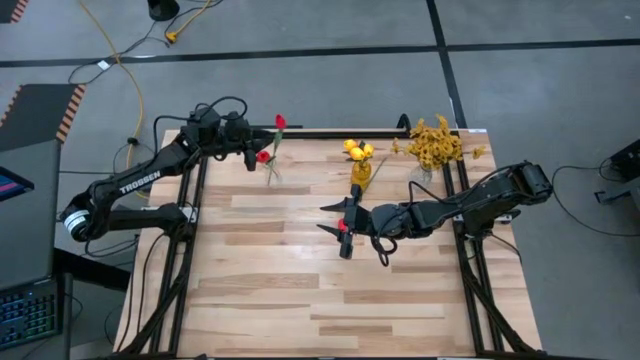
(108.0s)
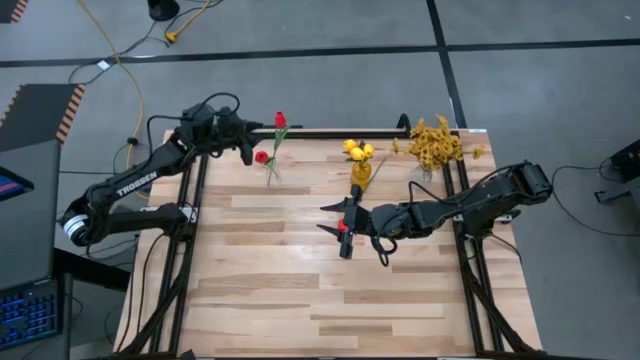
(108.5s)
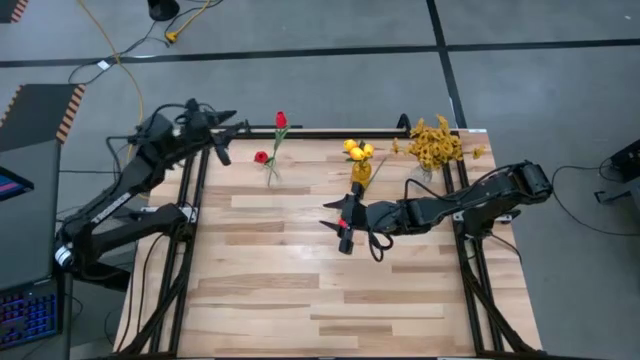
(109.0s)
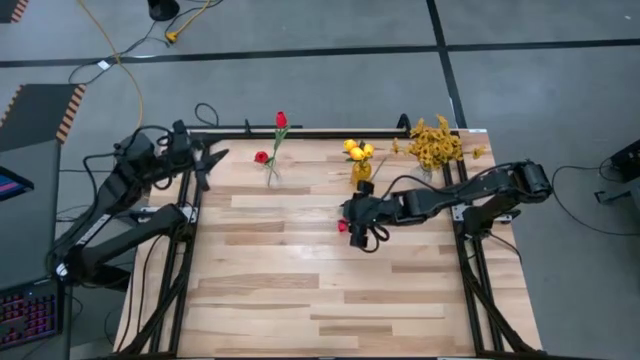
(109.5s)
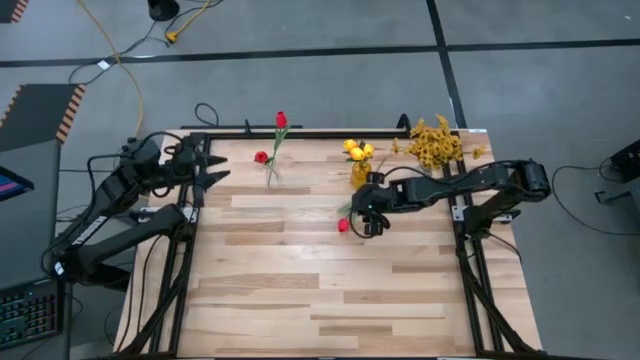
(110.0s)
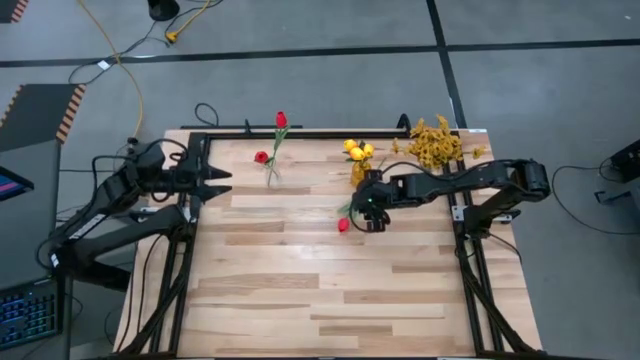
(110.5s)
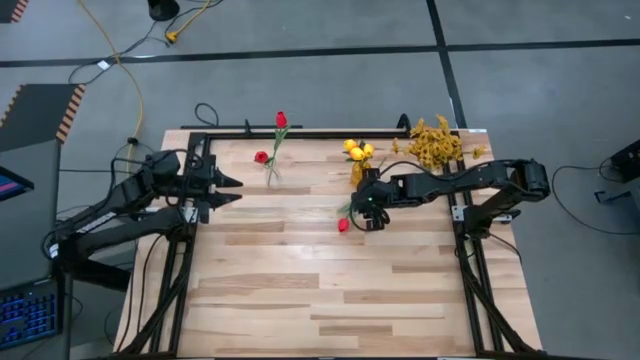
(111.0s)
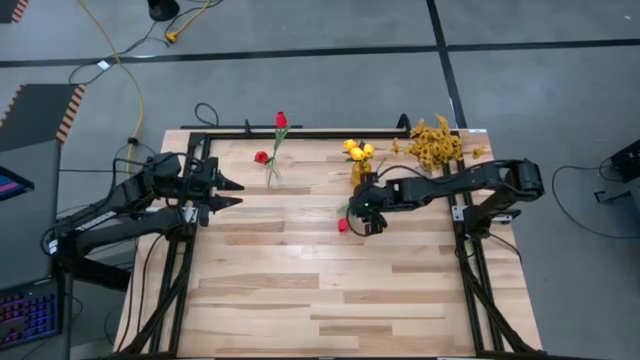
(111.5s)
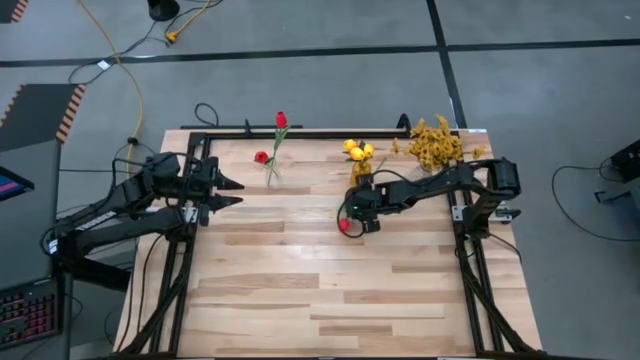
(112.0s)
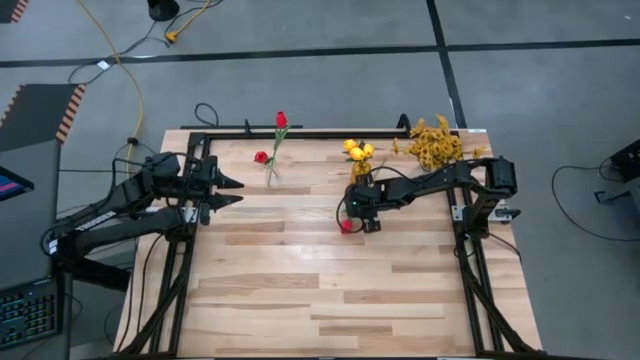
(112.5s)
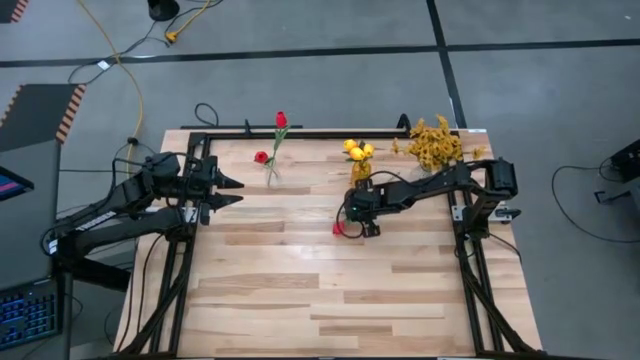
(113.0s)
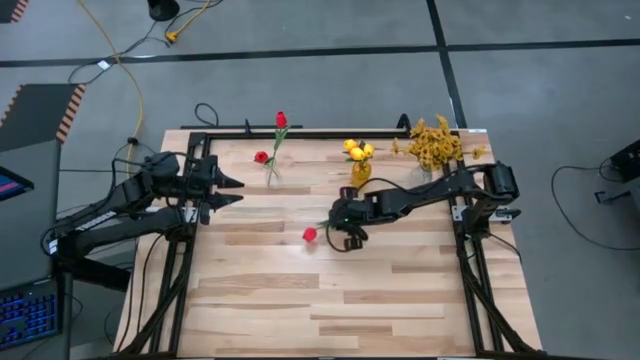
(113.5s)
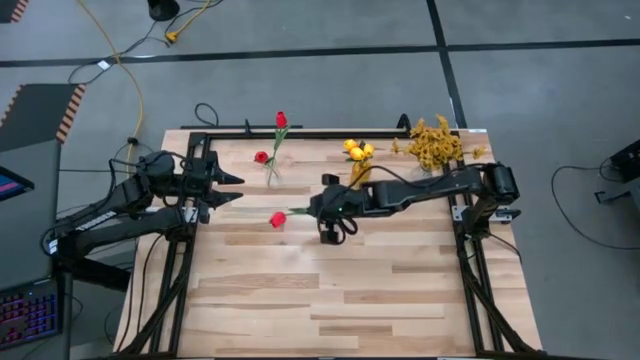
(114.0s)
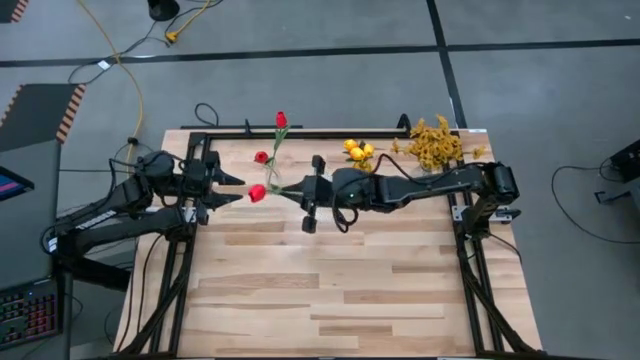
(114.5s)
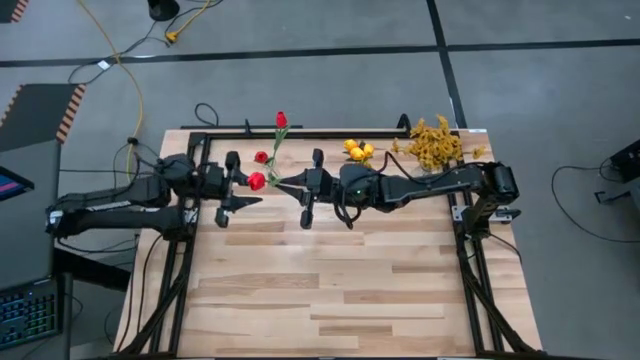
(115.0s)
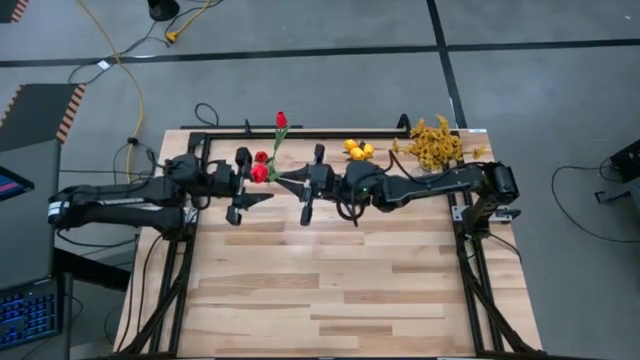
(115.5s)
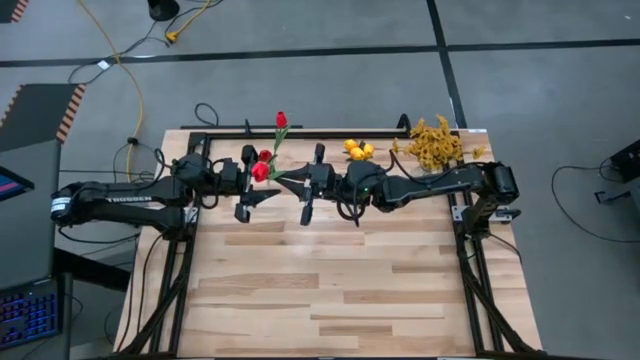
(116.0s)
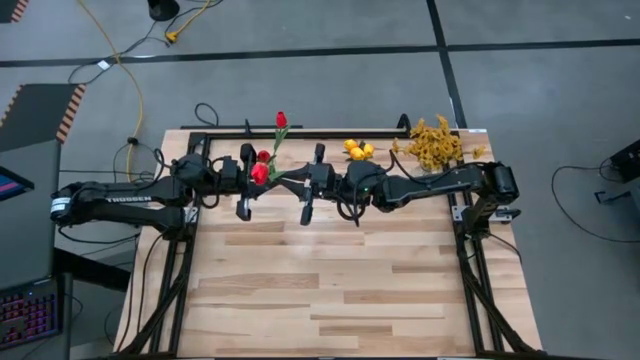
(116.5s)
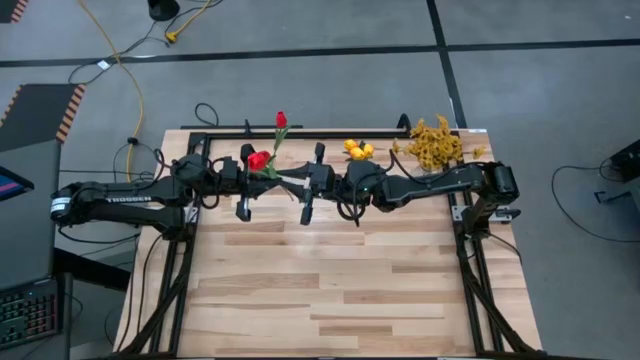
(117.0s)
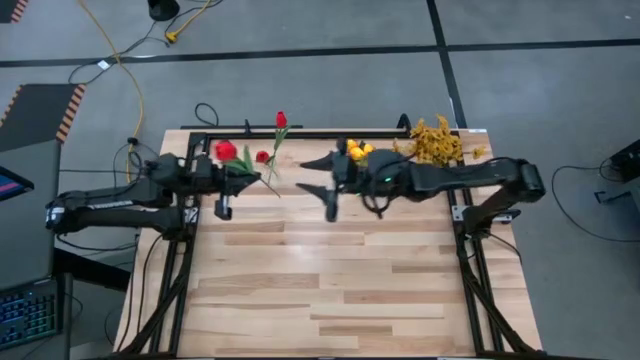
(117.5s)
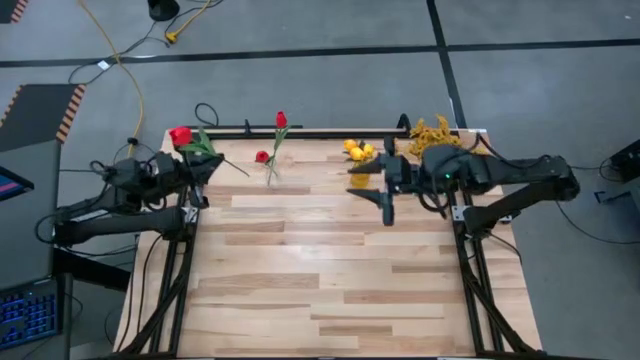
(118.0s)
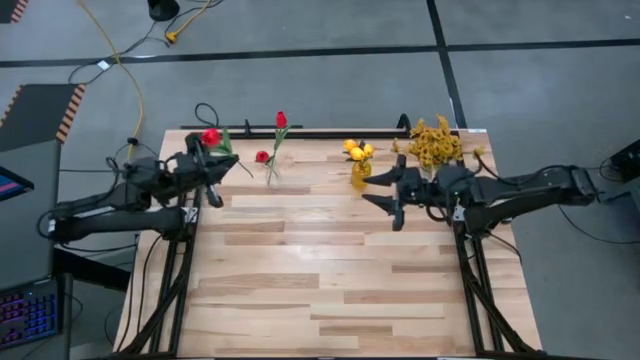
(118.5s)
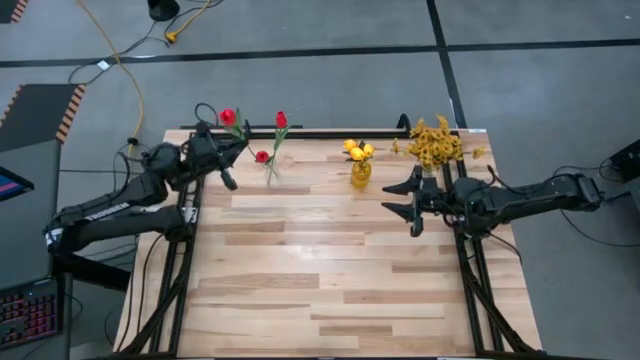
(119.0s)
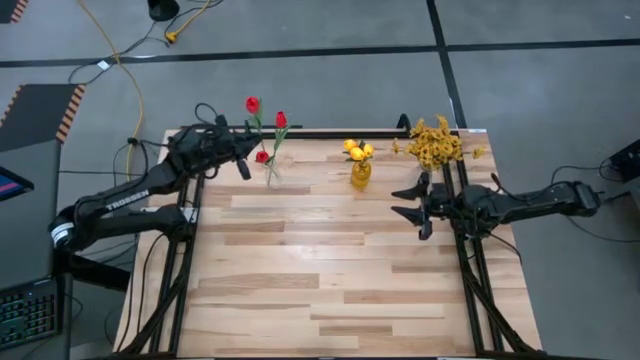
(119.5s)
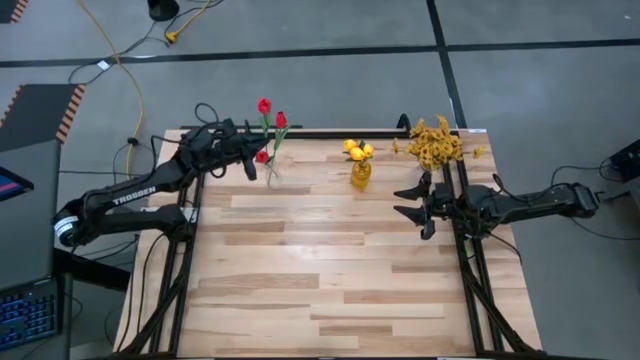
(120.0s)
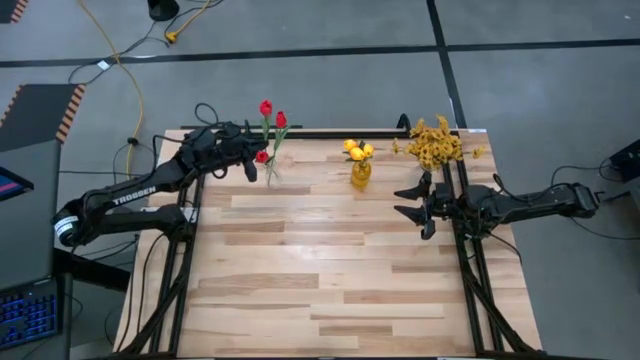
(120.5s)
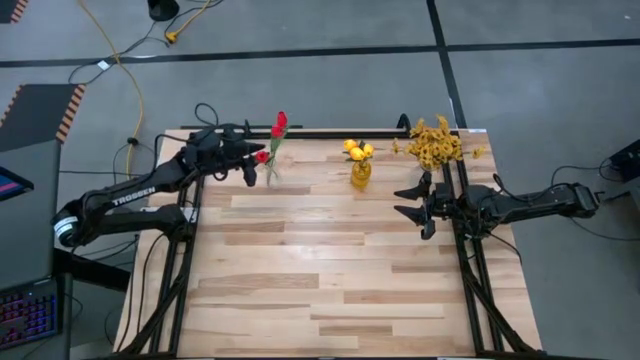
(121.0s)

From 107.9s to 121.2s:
Task: Sort flowers into vase by color
Put the red flower into the left transparent flower vase

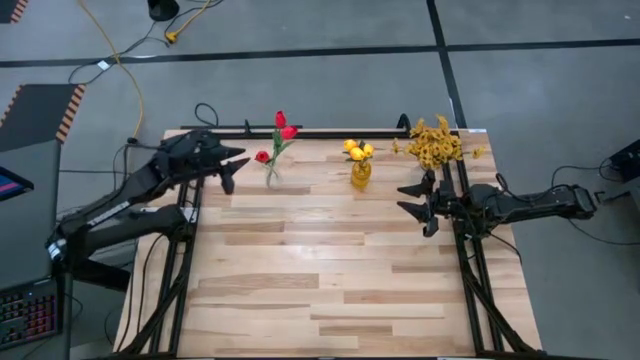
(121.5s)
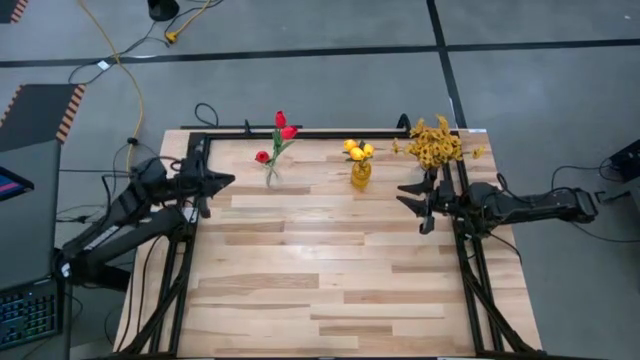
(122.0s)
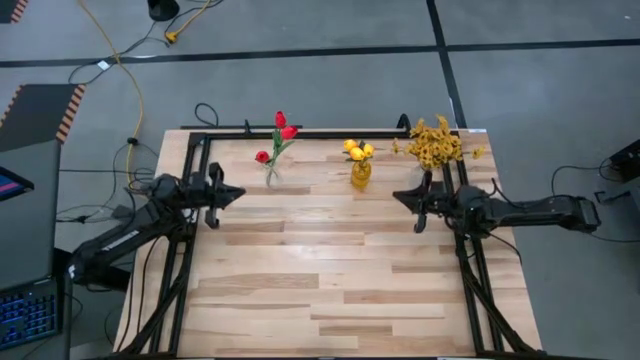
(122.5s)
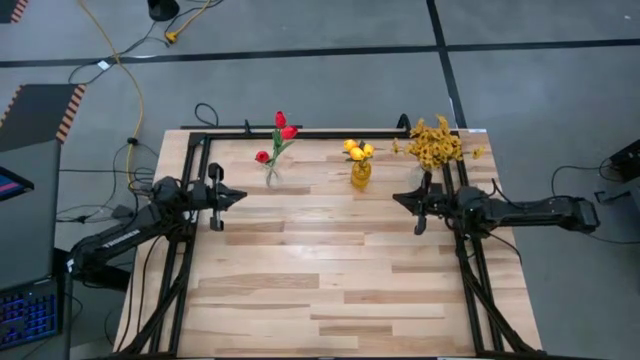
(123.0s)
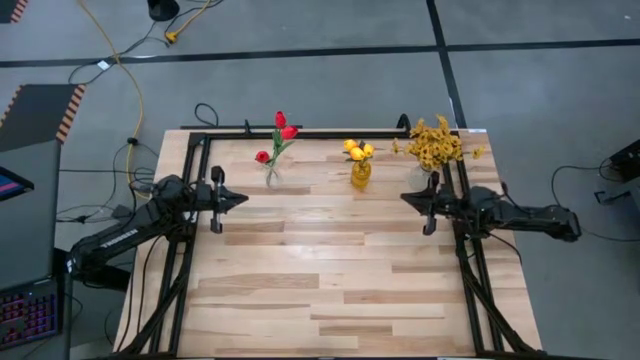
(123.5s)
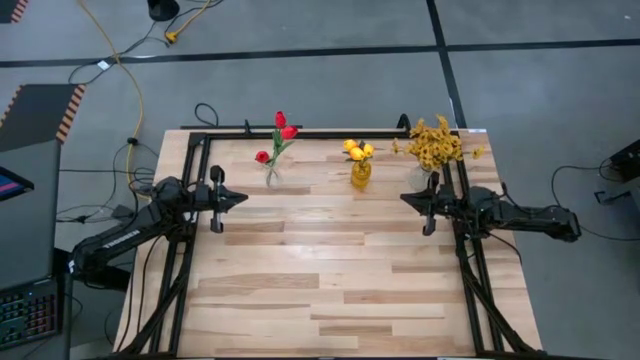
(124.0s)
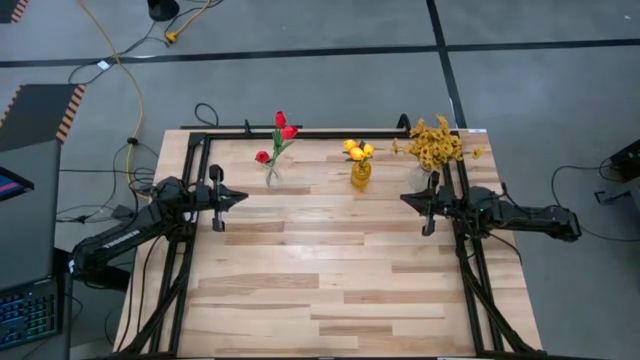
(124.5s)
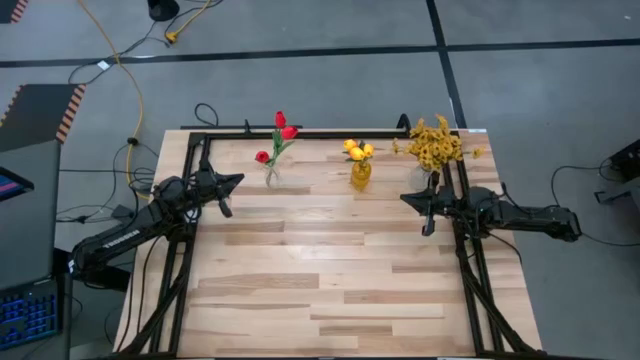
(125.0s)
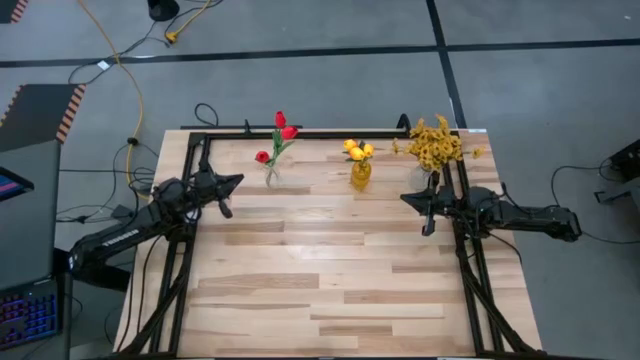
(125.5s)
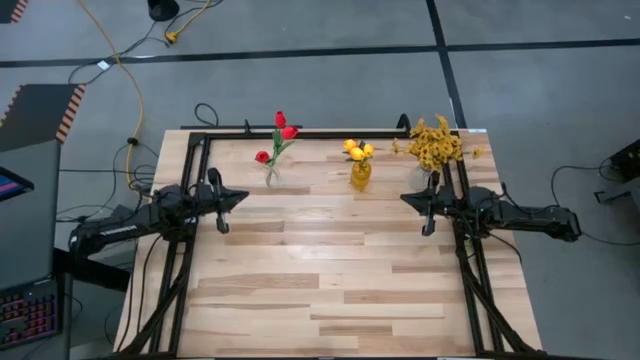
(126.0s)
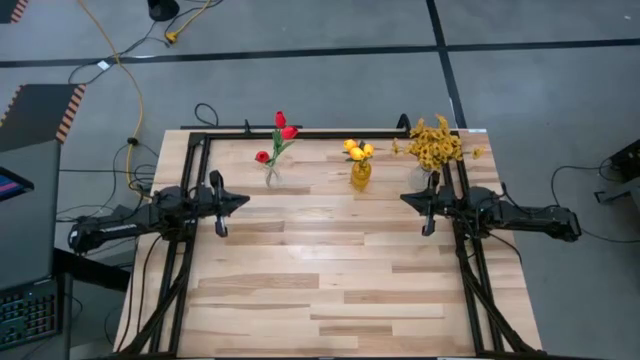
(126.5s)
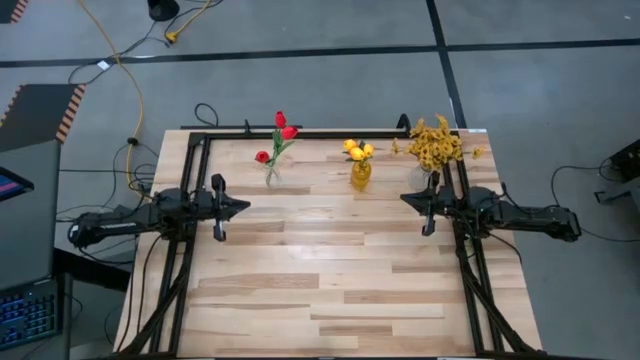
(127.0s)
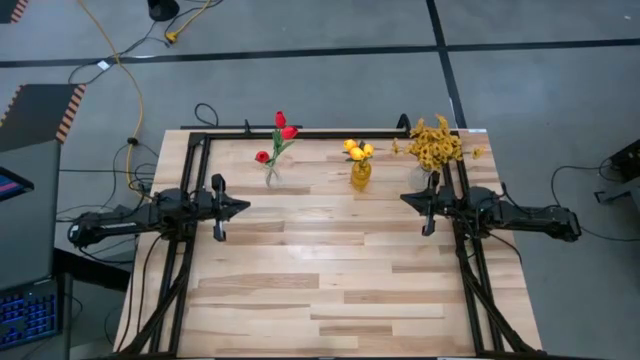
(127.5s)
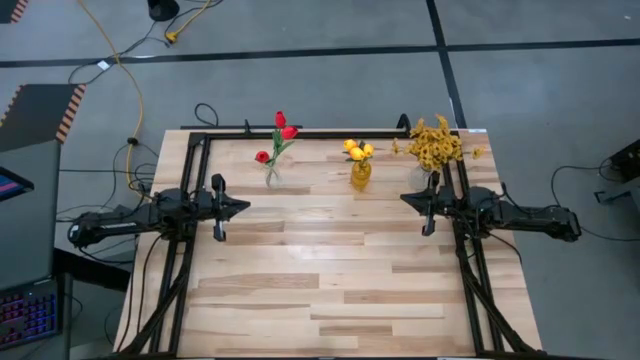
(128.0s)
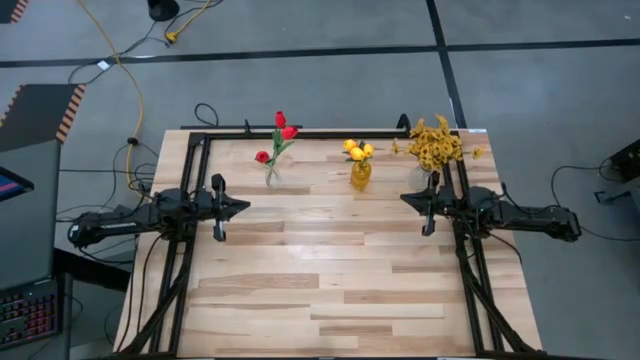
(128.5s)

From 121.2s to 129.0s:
Return to Home Position

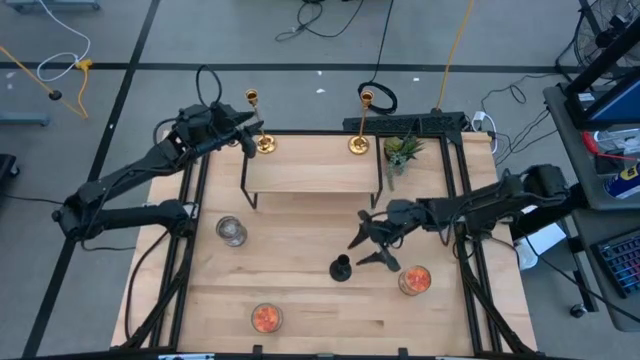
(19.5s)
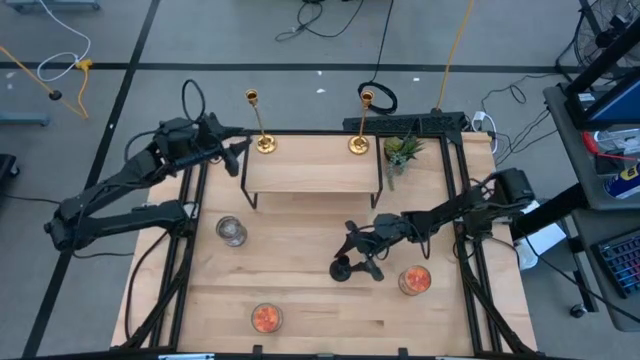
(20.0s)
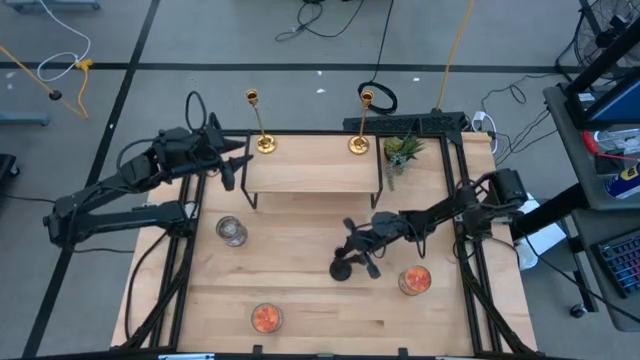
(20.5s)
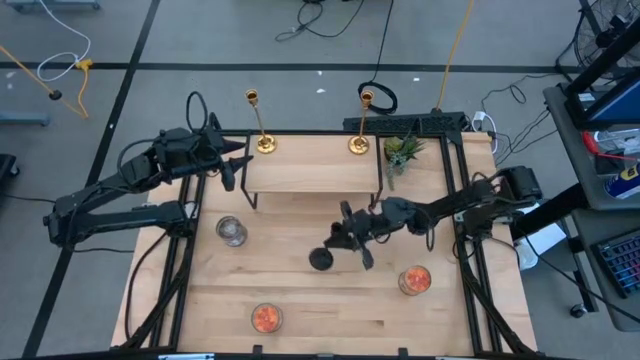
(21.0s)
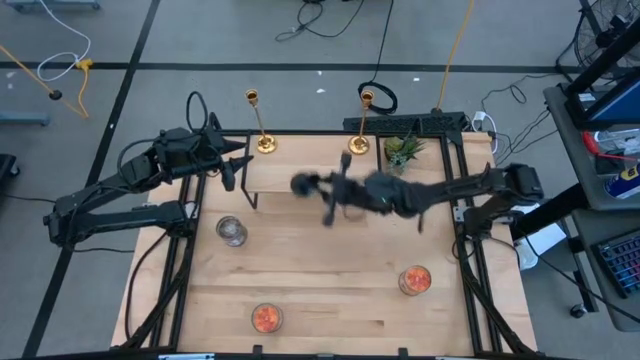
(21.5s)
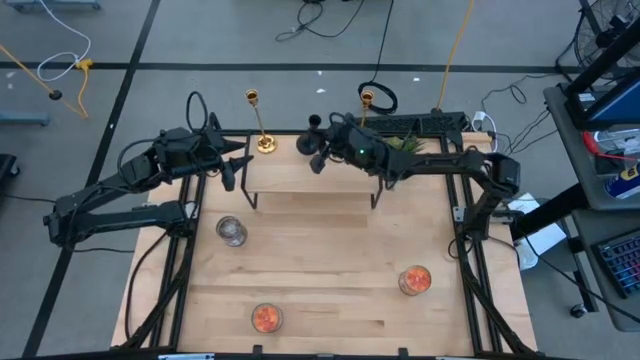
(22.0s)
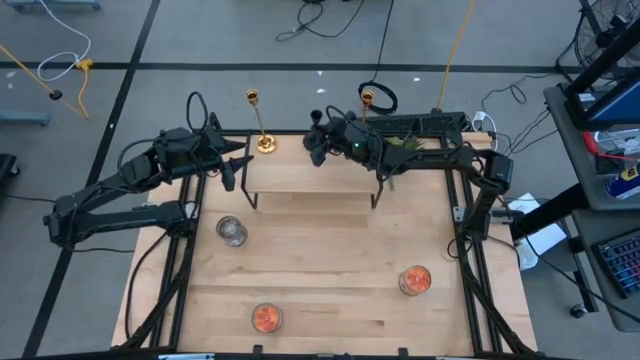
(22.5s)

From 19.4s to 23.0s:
Task: Pick & Place candle stick holders
Put the black candle holder on the shelf
